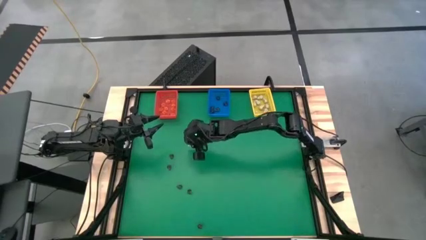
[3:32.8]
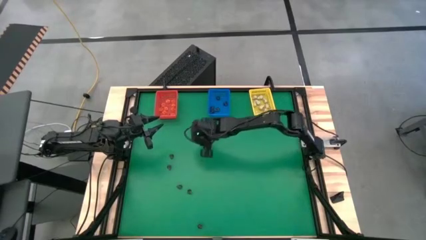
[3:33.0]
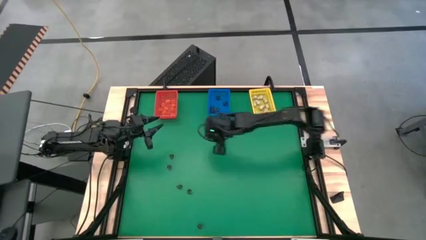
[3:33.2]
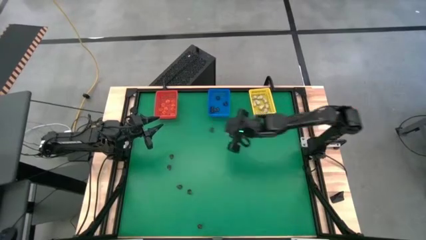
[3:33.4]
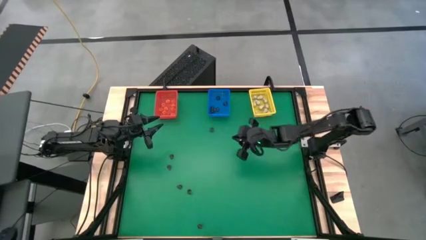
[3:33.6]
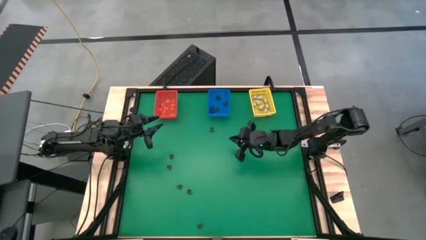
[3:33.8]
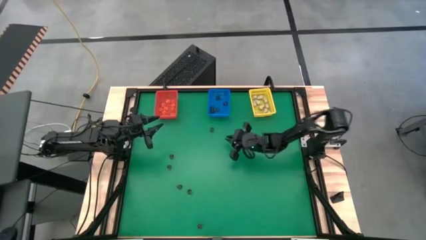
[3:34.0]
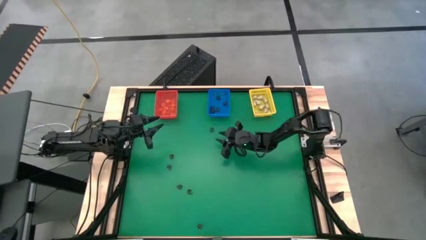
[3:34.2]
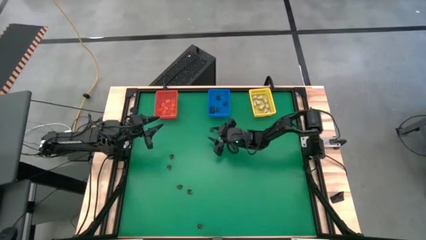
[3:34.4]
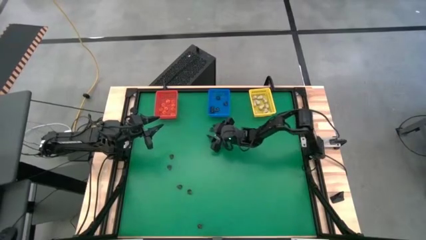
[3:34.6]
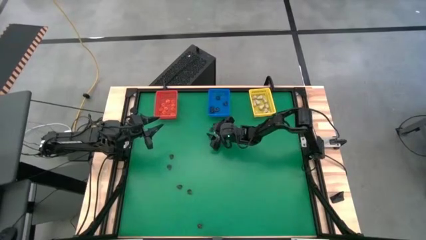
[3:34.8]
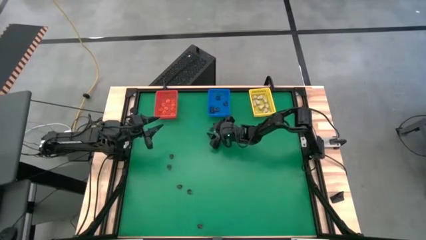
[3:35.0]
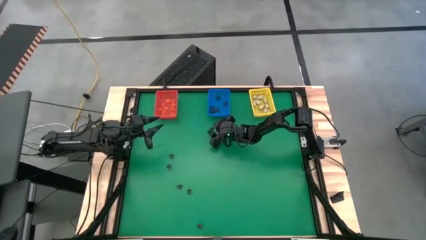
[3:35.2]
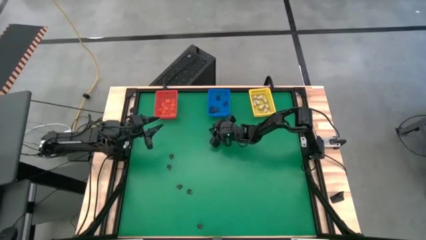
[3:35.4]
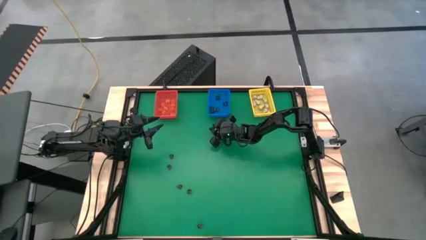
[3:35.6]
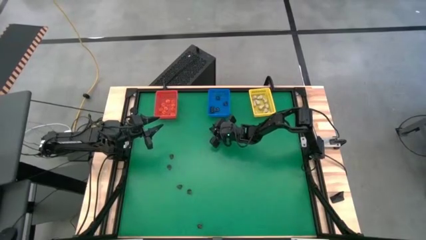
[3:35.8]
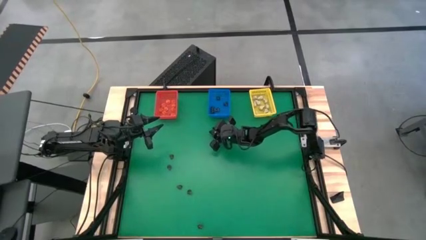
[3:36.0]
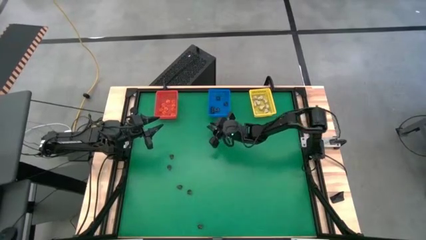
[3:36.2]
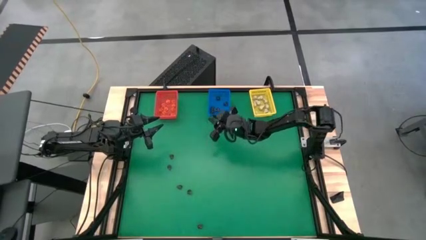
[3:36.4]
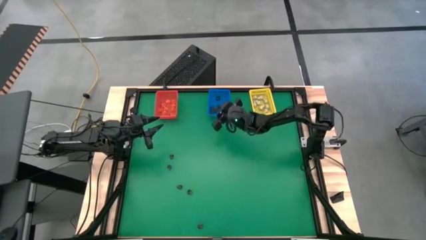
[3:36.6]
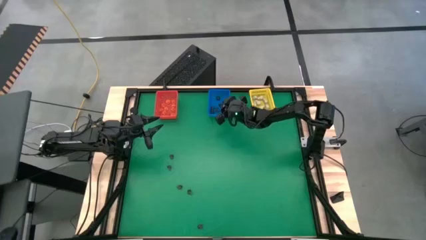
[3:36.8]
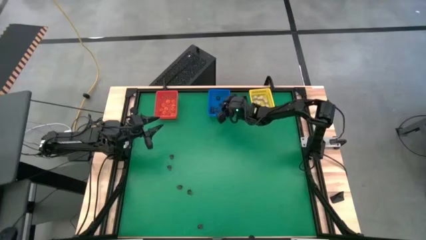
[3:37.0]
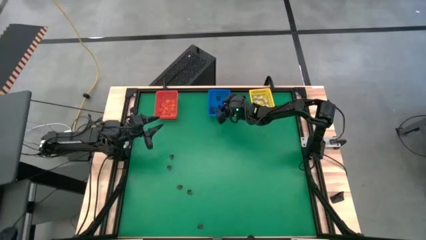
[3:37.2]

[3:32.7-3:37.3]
Task: Sort Halloween decoration
Put the black skull toy into the blue bin

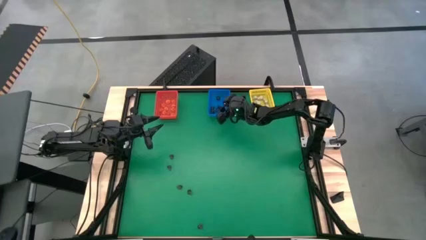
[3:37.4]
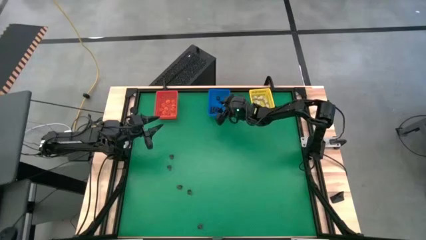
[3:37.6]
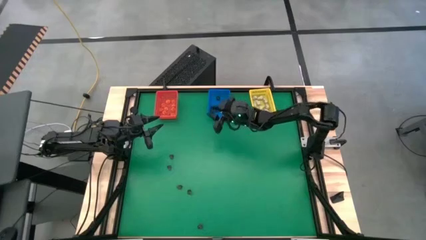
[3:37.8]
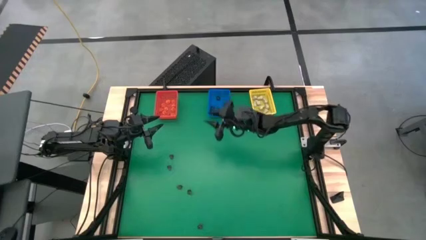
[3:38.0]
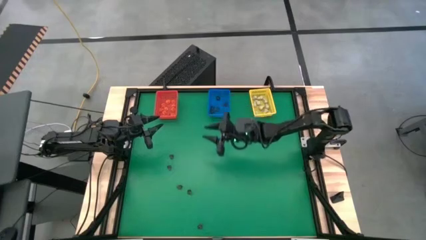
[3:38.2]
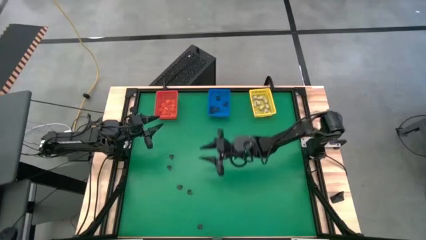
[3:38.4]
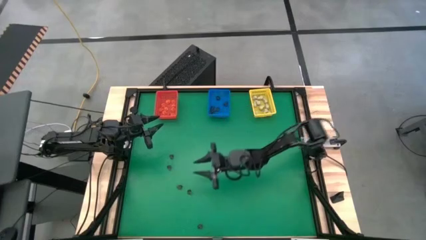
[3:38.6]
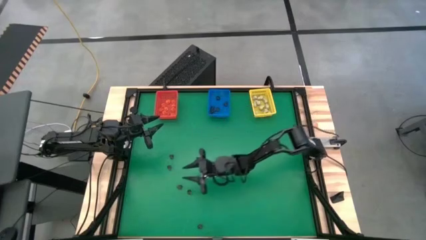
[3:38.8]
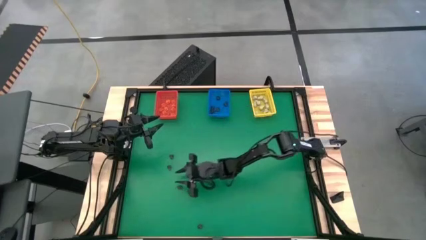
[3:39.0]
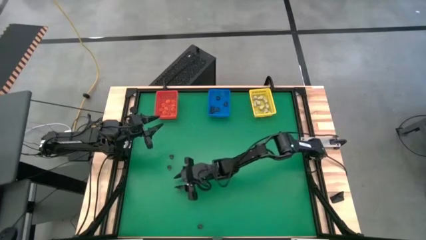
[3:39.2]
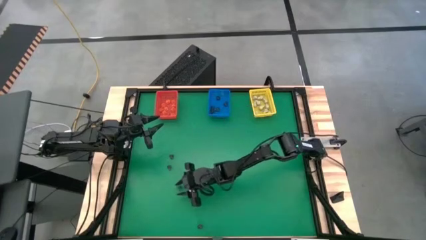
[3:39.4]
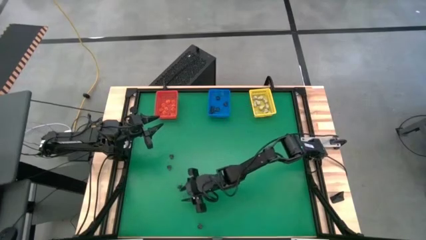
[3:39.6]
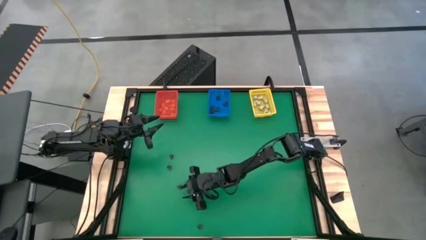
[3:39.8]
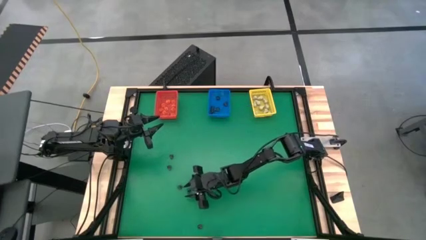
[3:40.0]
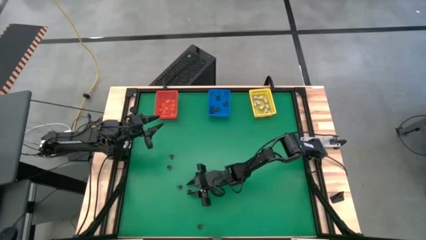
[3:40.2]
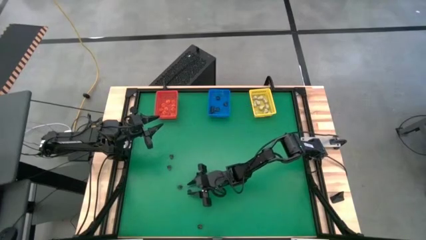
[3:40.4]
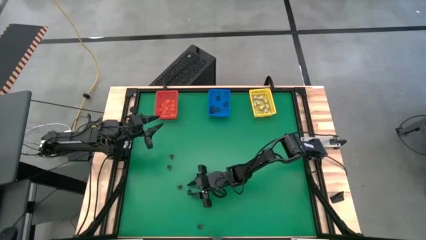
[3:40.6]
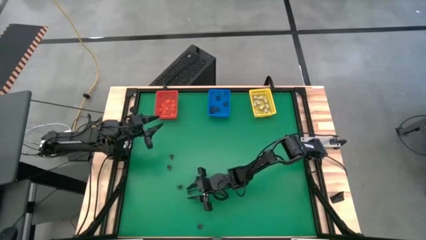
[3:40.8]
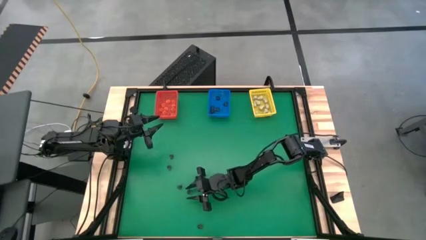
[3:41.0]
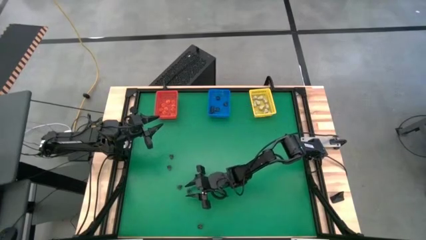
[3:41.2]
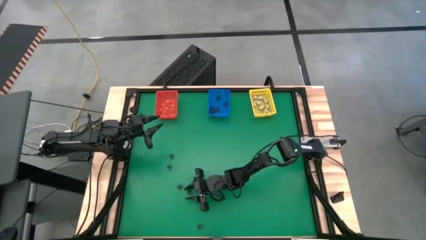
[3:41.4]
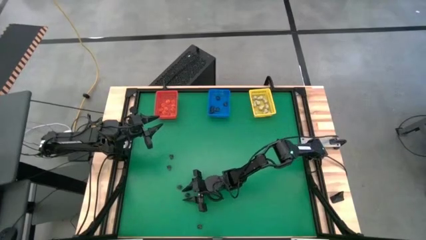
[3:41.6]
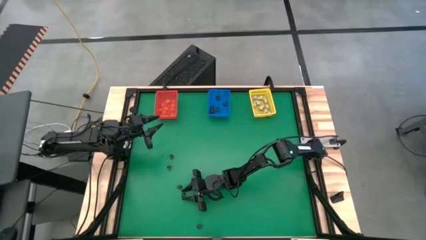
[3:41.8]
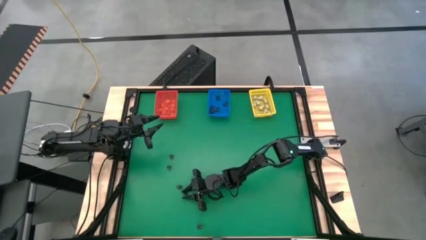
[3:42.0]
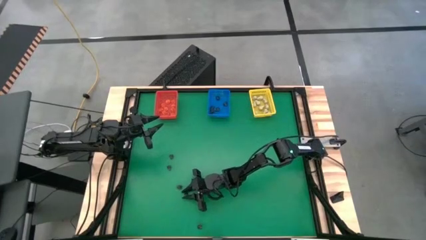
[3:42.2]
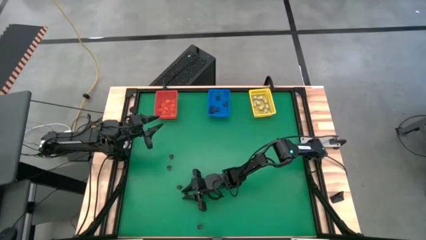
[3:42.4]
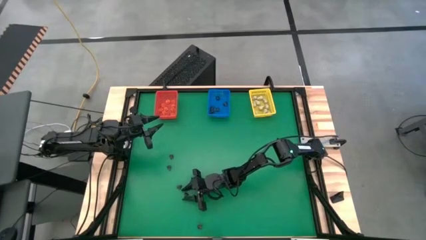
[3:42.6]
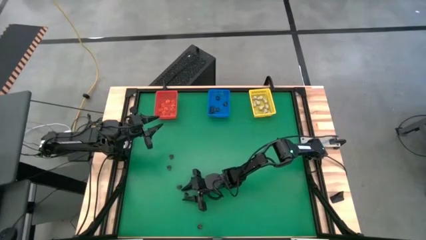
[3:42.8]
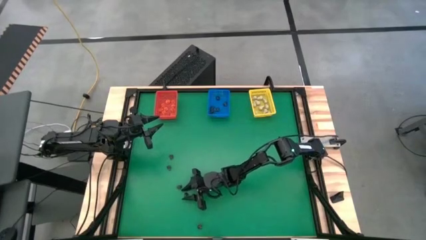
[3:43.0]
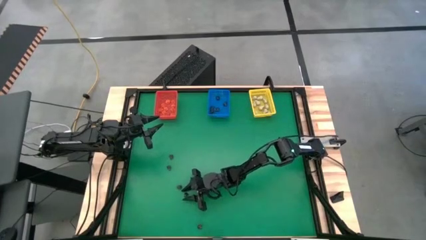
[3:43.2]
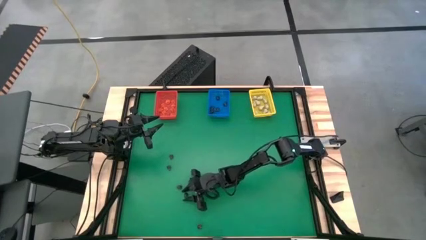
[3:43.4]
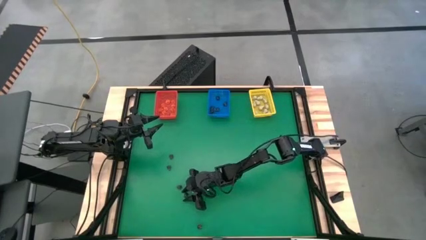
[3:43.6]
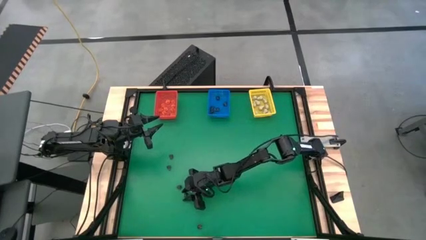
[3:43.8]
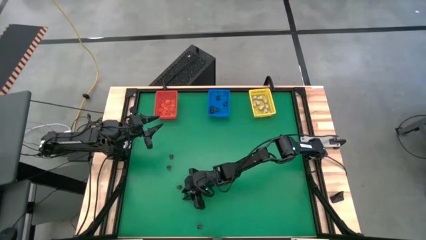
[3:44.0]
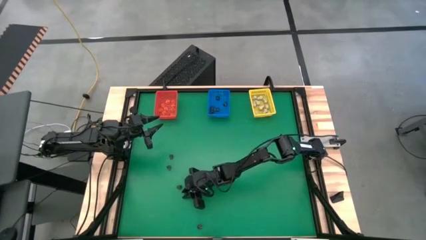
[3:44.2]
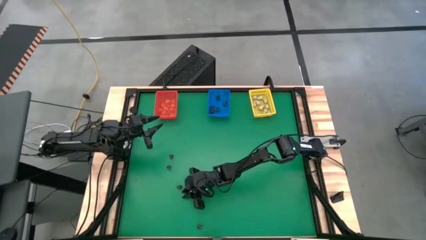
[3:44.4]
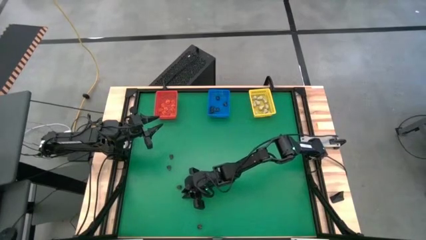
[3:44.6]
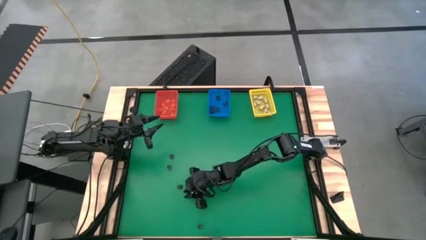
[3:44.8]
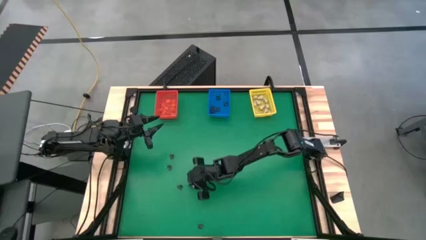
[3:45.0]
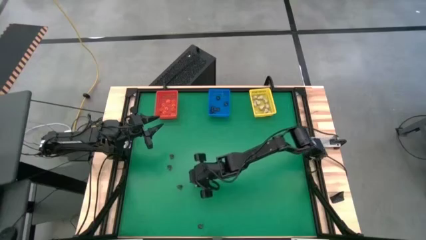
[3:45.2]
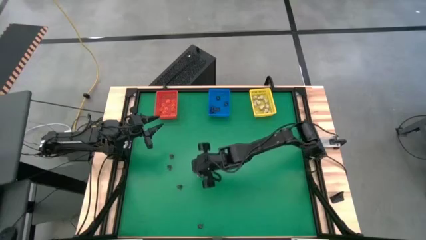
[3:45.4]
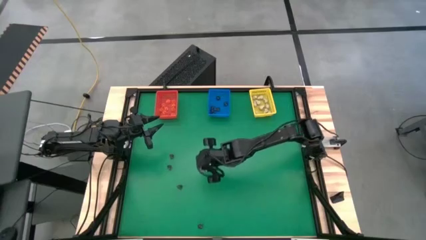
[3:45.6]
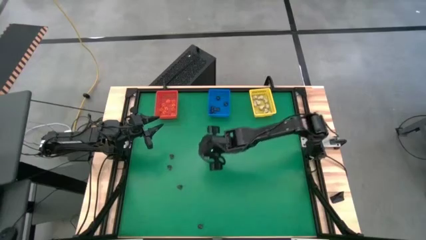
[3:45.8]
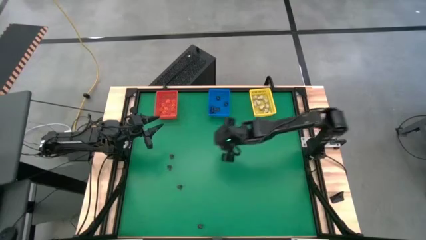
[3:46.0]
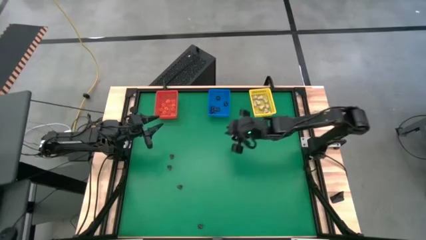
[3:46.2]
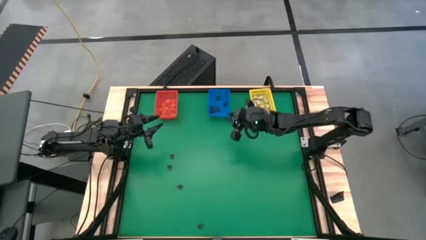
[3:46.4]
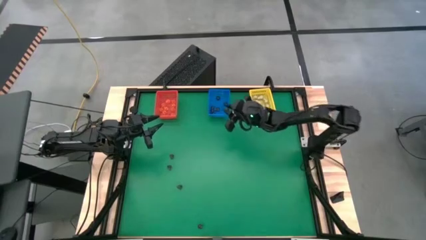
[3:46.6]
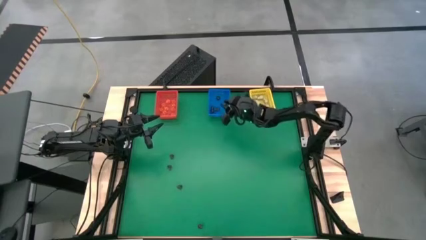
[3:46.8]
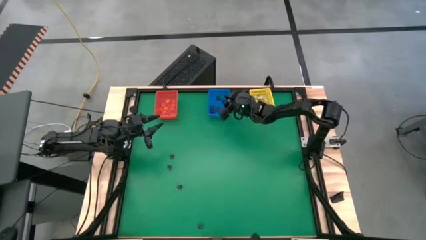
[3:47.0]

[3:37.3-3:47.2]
Put the black skull toy into the blue bin

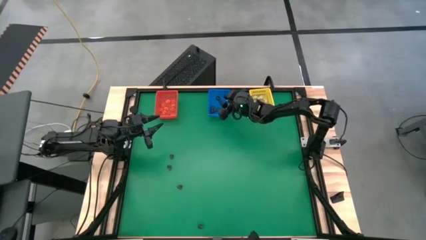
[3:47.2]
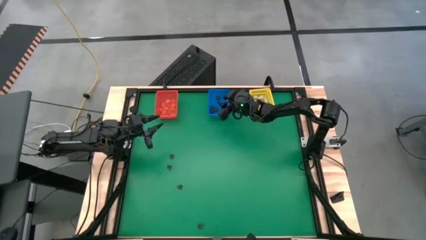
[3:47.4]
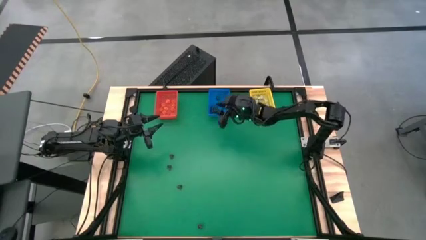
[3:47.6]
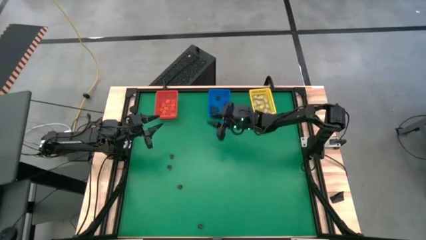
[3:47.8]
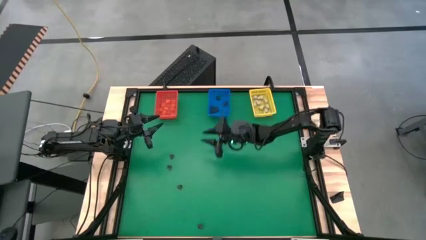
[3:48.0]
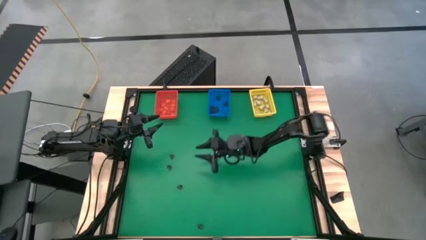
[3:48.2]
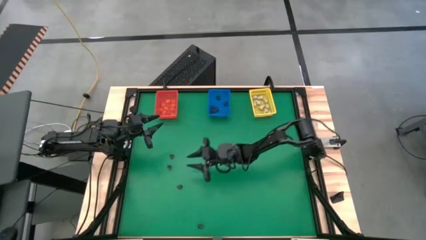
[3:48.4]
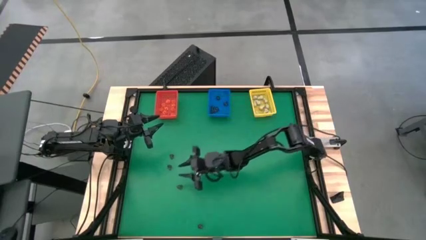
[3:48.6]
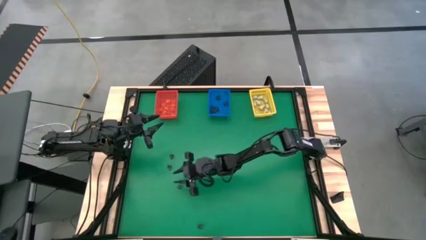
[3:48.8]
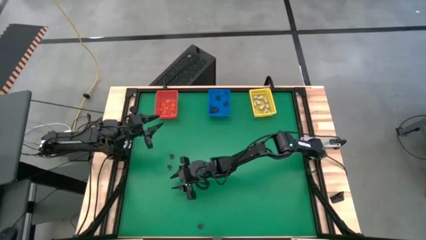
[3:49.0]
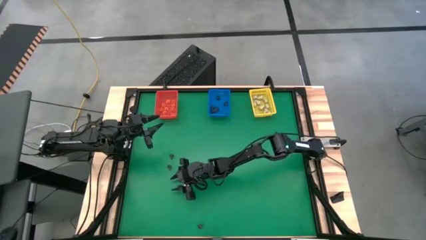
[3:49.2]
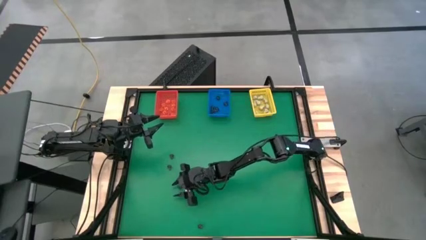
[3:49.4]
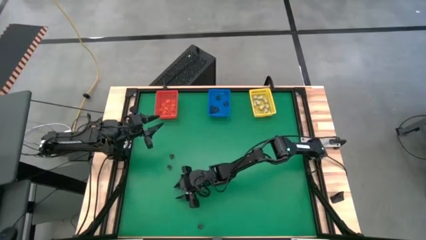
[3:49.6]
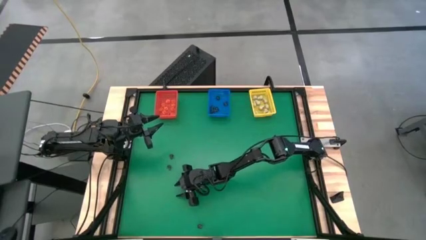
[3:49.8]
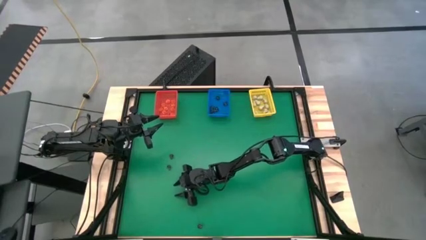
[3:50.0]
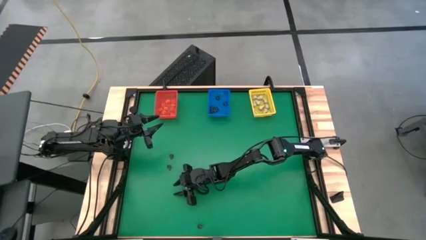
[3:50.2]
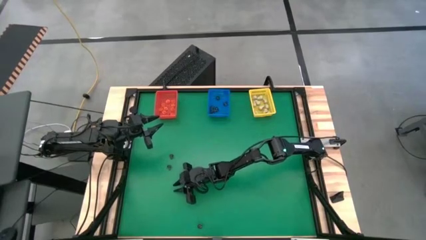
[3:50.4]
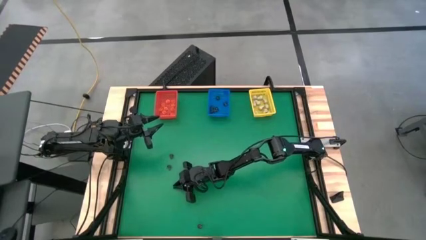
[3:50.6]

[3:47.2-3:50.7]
Put the black skull toy into the blue bin
